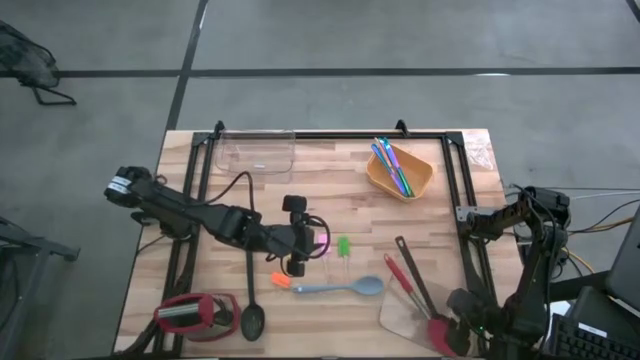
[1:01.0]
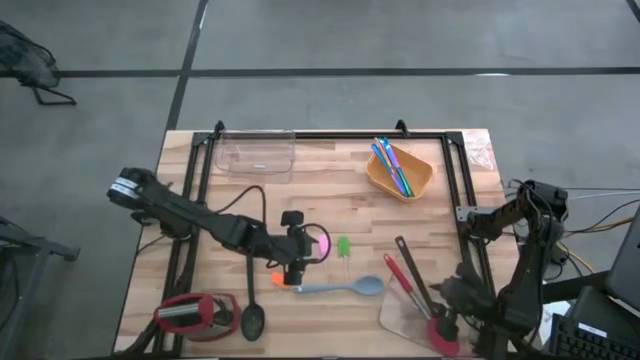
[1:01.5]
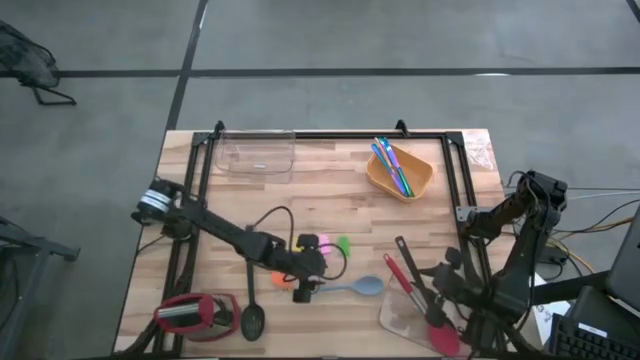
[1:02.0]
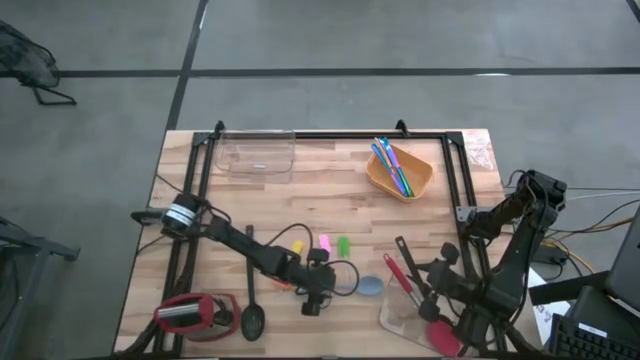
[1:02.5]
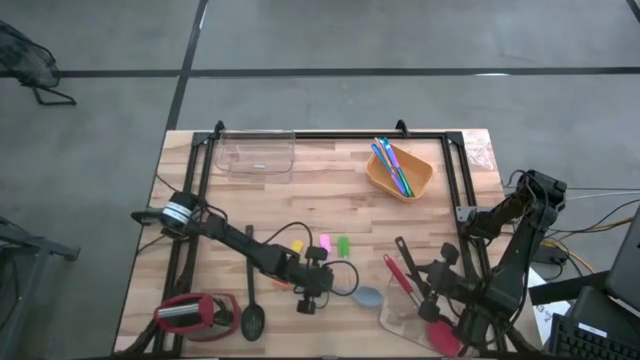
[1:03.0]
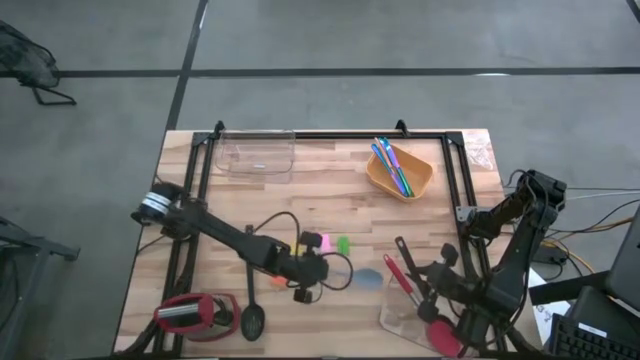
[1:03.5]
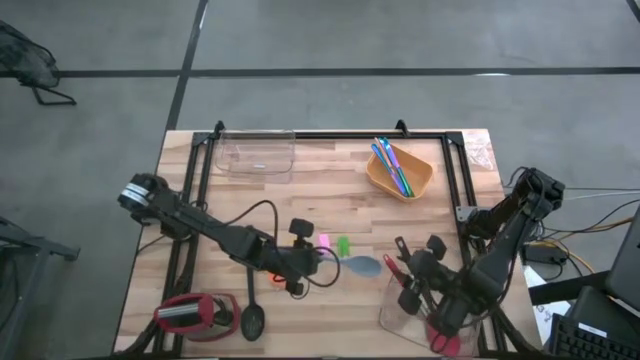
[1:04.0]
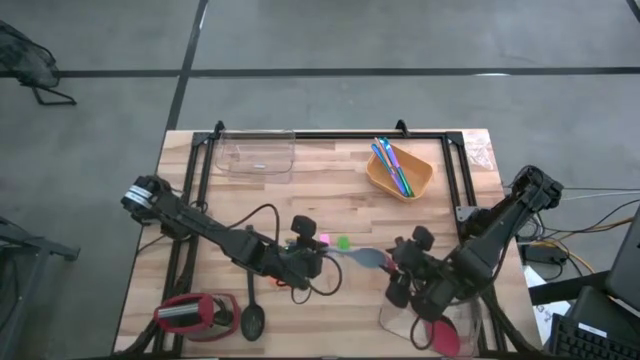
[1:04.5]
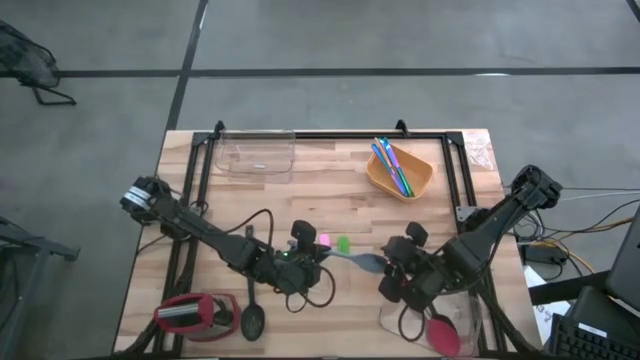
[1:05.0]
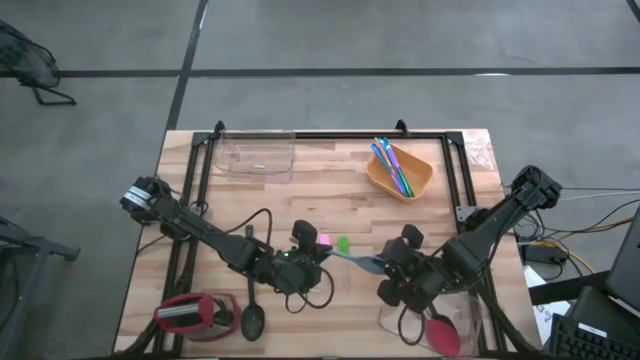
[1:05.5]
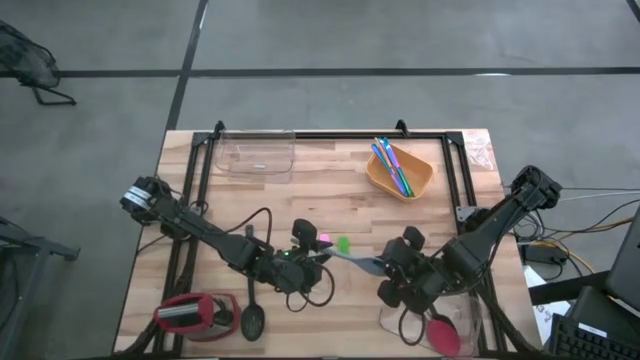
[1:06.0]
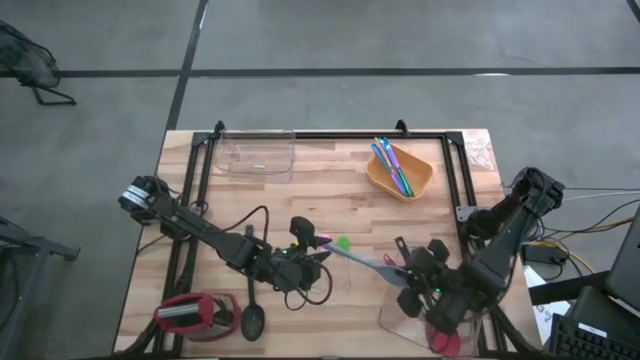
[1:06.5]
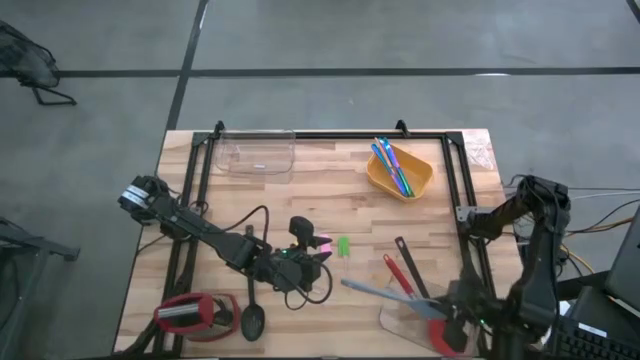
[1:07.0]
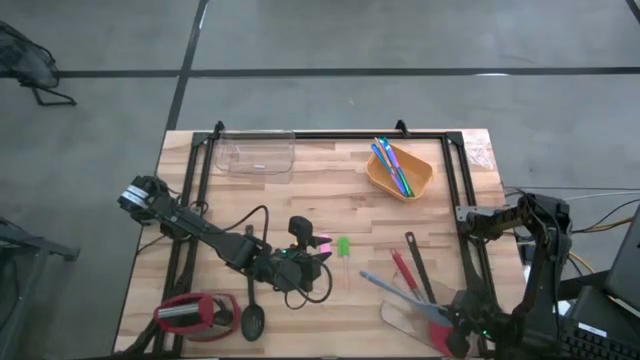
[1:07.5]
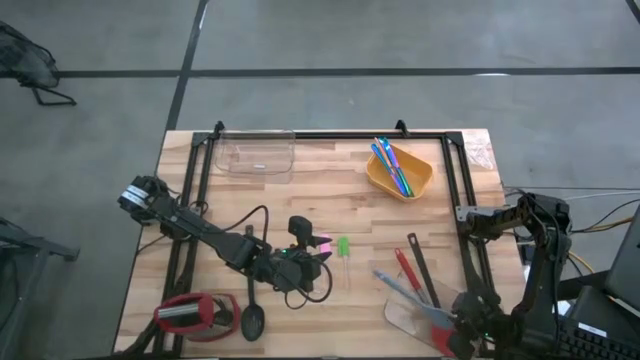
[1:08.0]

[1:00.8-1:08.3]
Task: Pick & Place Kitchen Items
Put the light blue serving spoon into the bottom transparent bin

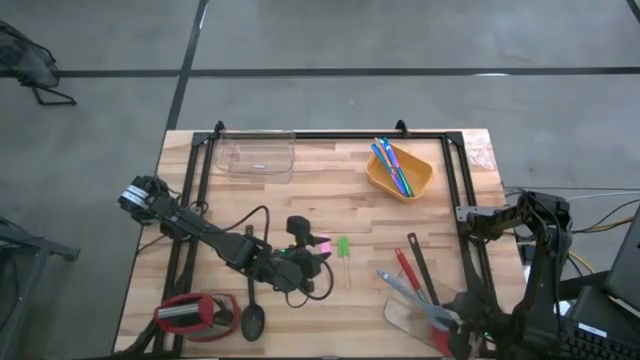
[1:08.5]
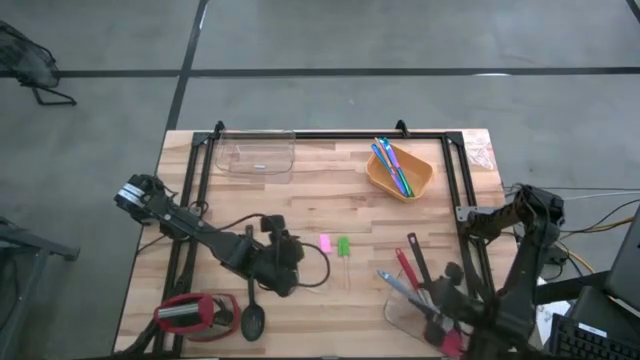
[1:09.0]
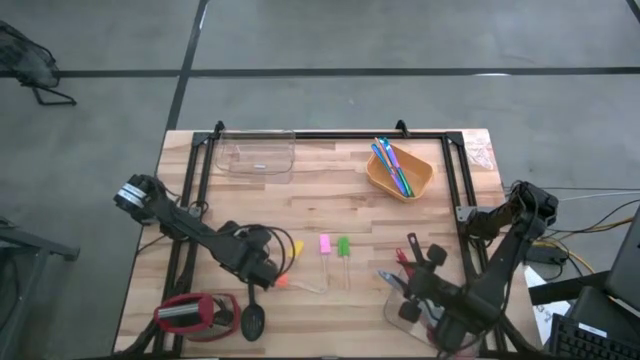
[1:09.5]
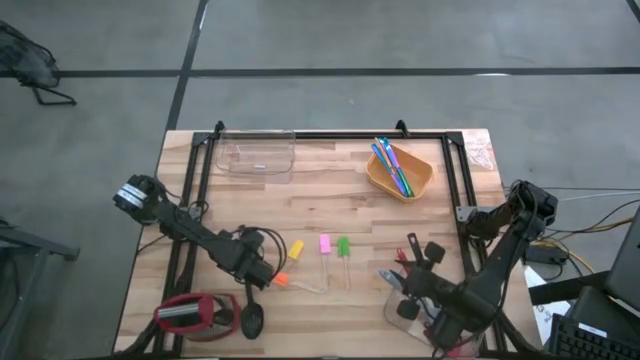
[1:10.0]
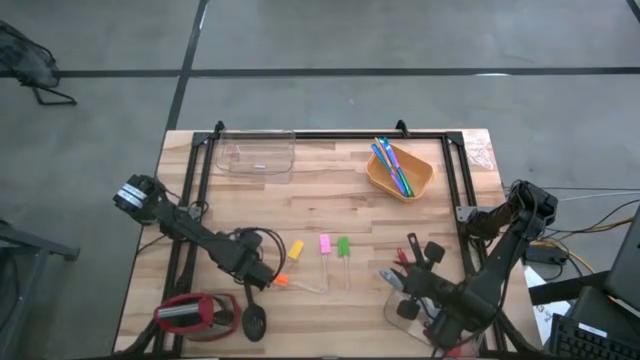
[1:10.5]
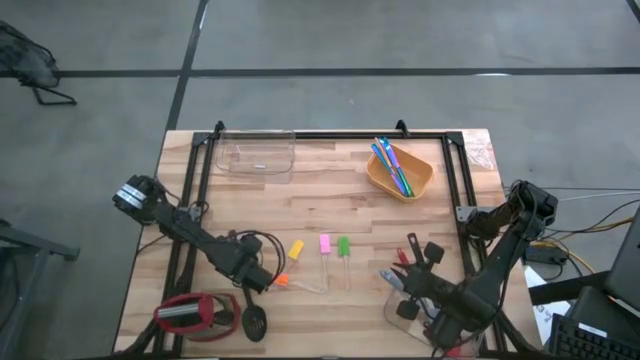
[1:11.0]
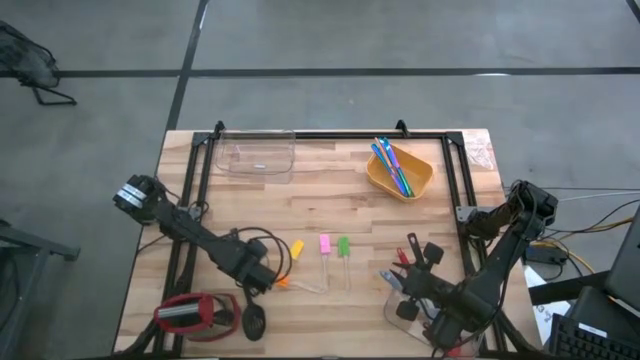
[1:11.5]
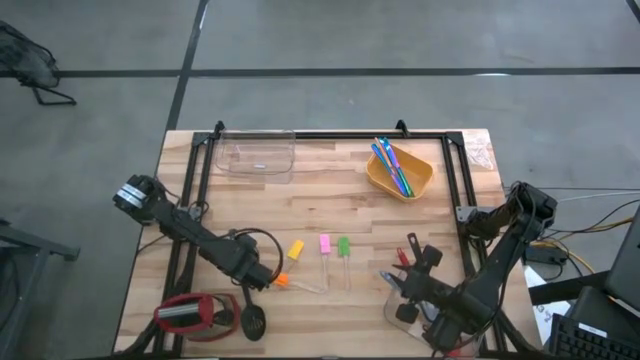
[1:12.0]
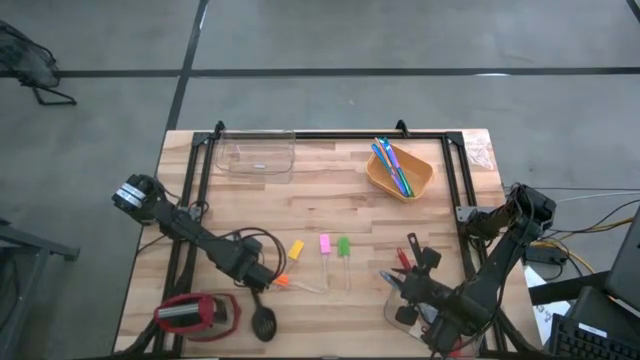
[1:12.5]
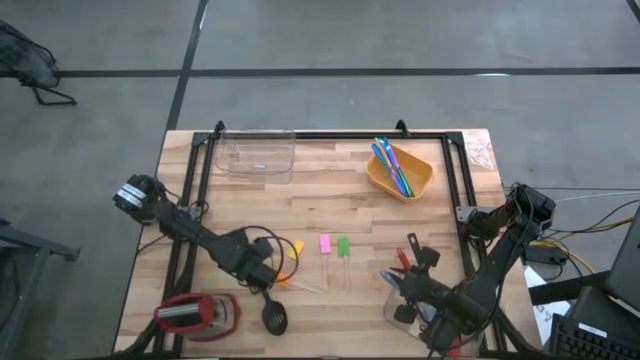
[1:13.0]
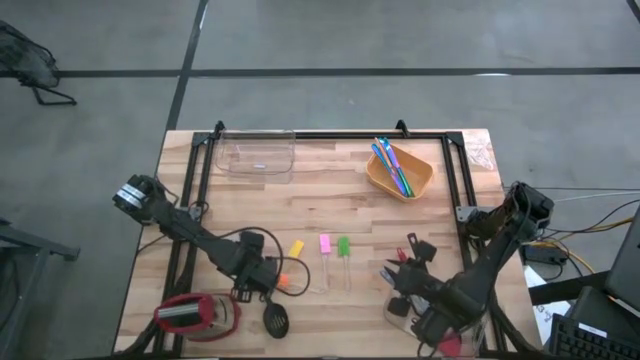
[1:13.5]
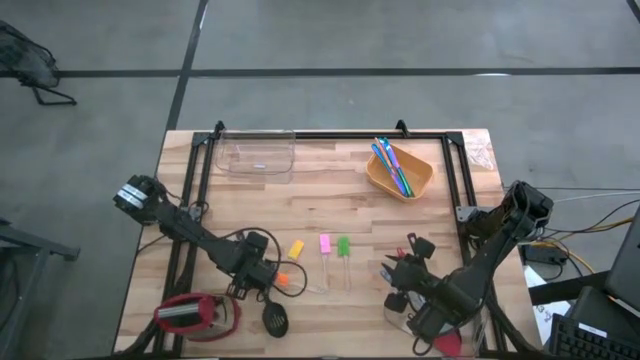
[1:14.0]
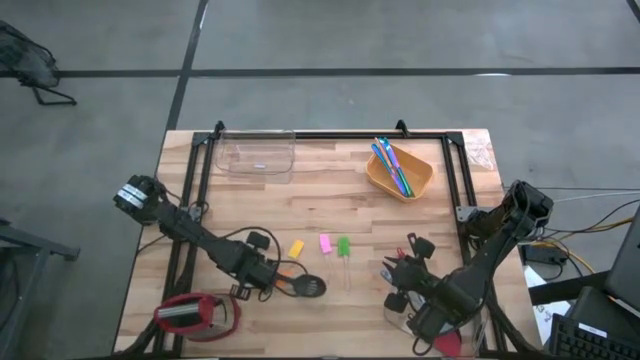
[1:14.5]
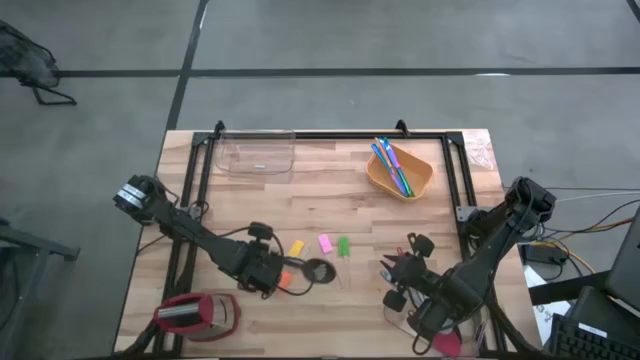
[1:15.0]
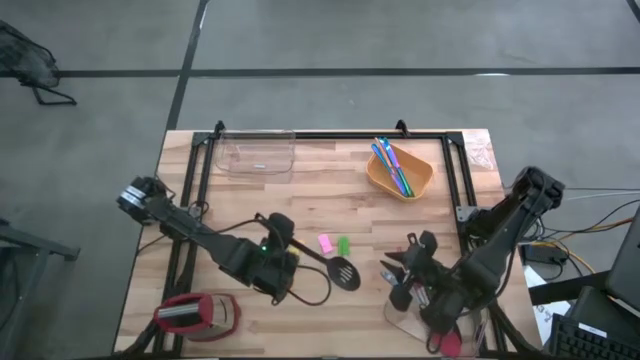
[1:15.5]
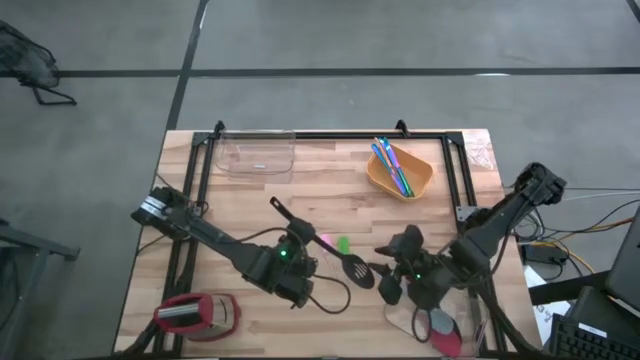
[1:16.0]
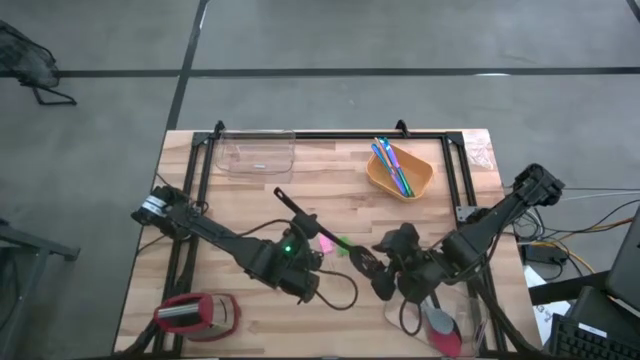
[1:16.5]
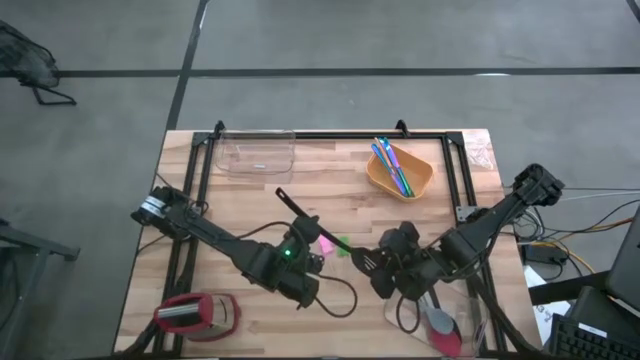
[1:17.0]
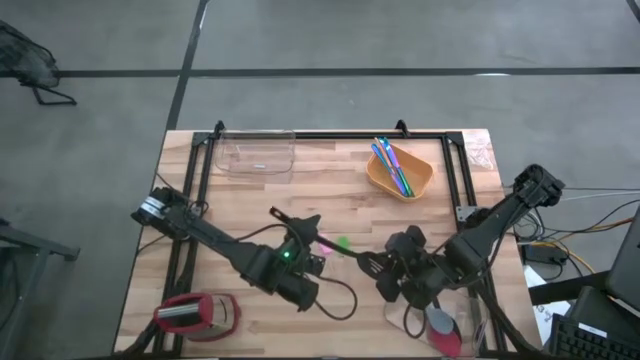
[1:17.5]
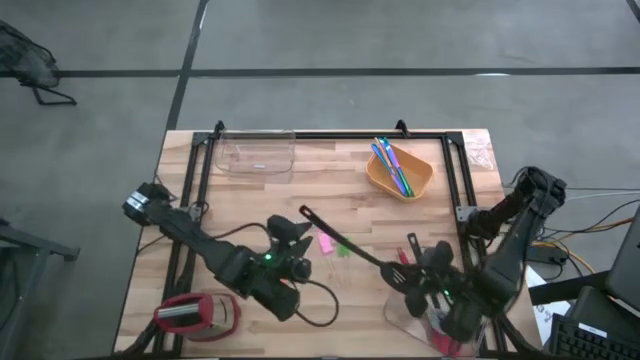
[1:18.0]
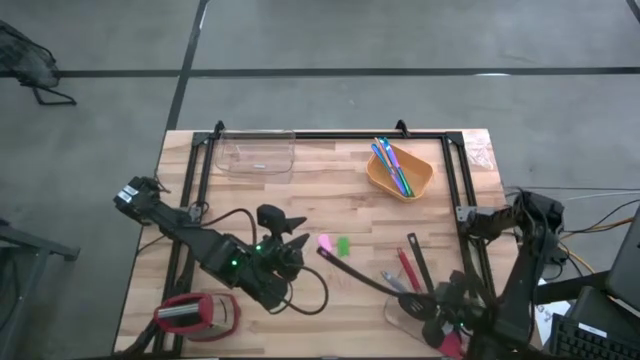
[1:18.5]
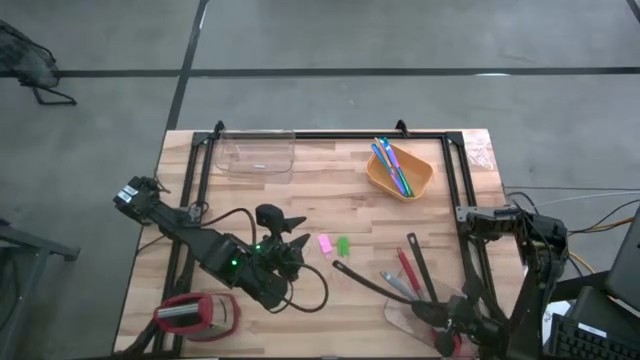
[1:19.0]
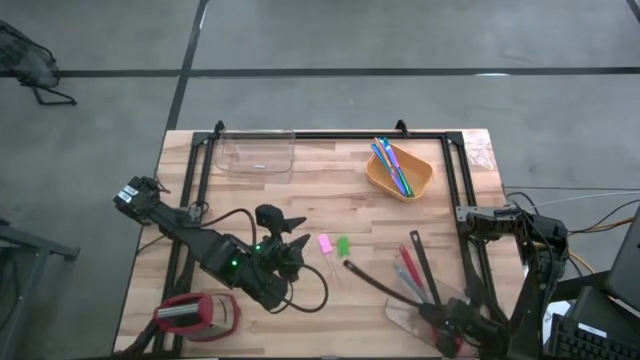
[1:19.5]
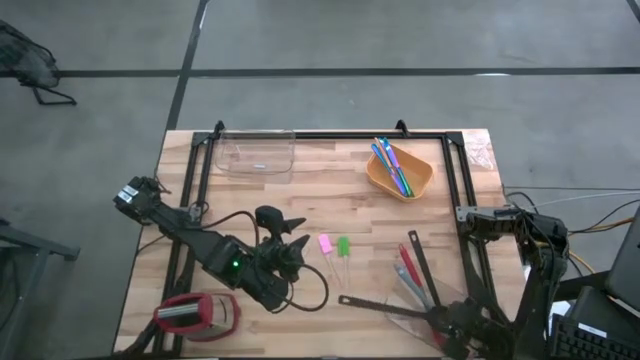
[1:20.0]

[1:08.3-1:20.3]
Put the black serving spoon into the bottom transparent bin

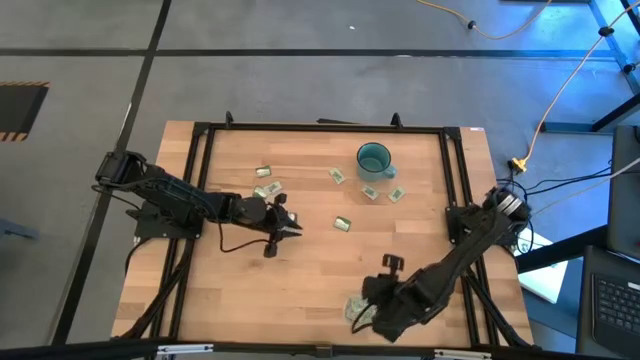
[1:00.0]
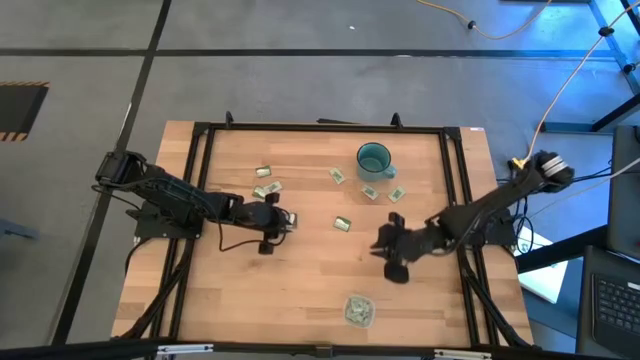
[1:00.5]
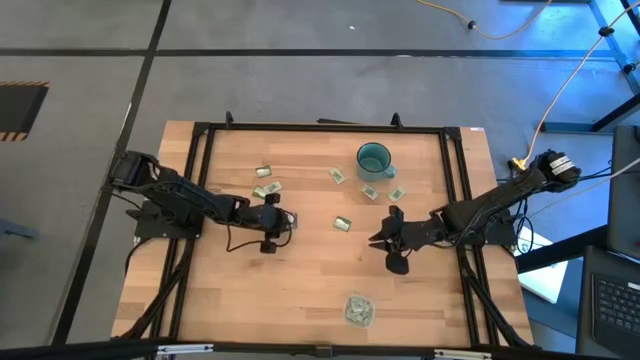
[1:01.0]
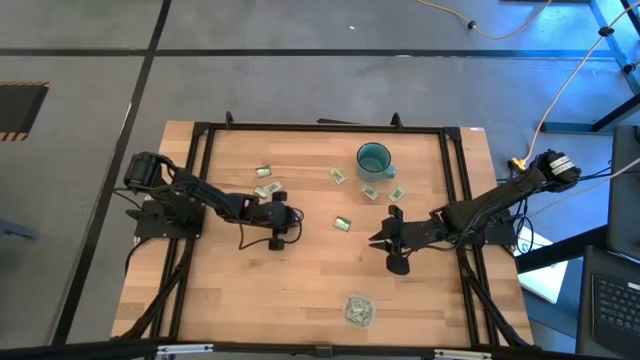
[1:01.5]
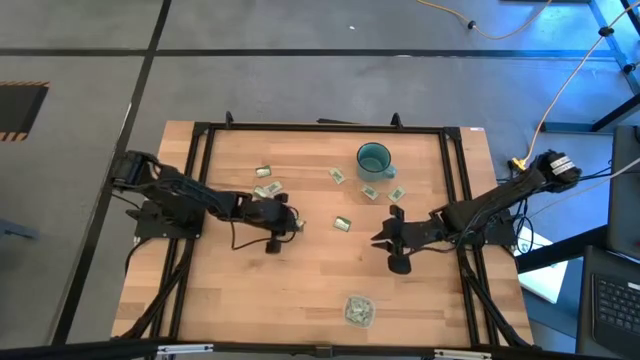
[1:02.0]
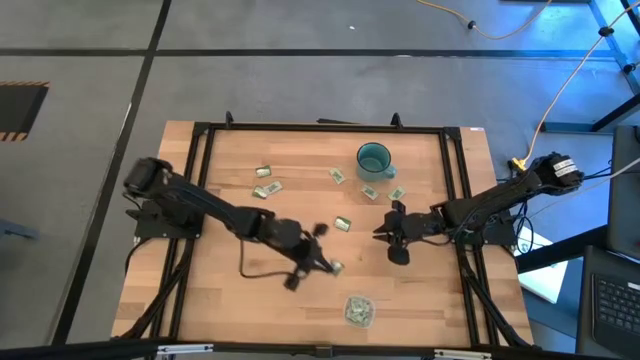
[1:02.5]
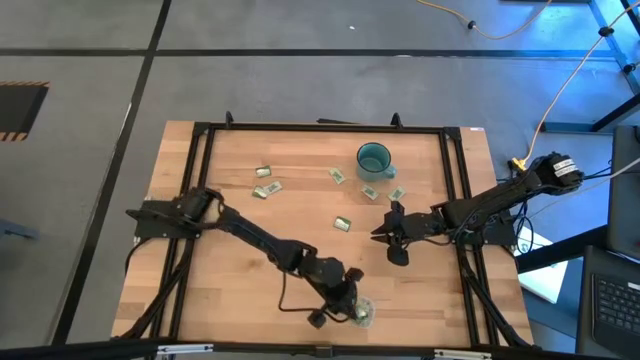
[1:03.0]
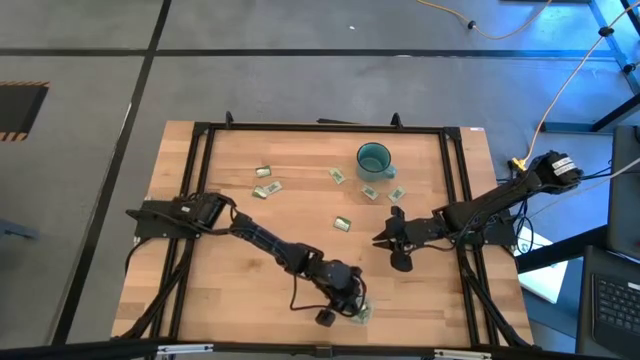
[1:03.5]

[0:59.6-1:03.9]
Task: Pick and place items into bin
Put the green truvia packet into the transparent bin
